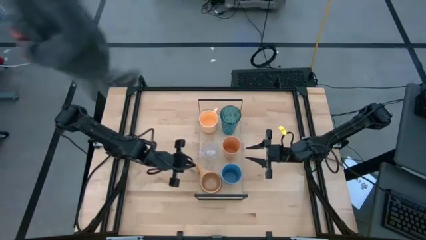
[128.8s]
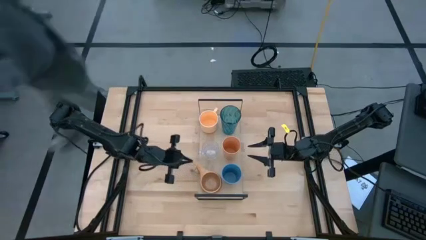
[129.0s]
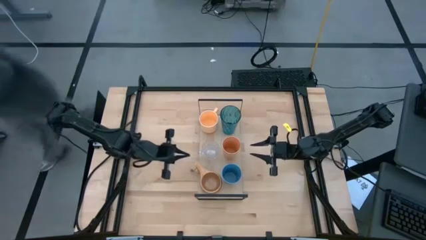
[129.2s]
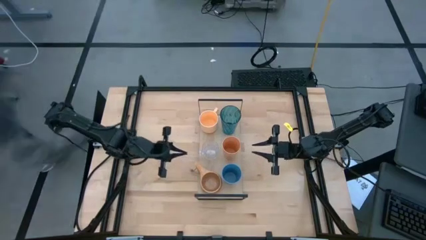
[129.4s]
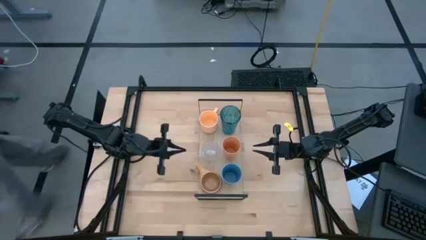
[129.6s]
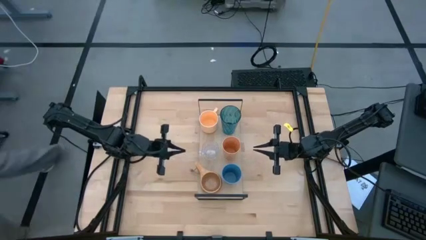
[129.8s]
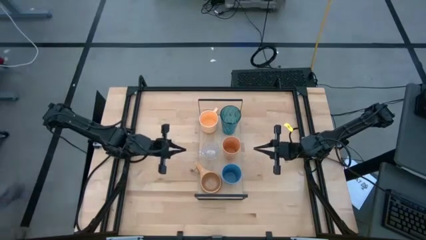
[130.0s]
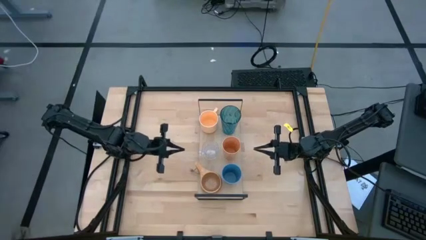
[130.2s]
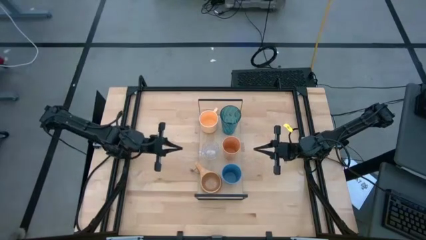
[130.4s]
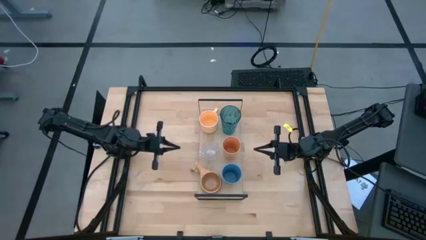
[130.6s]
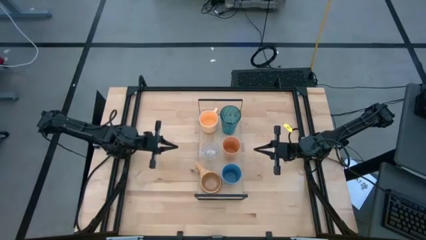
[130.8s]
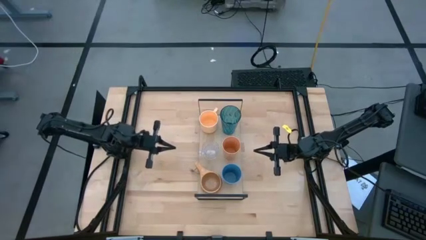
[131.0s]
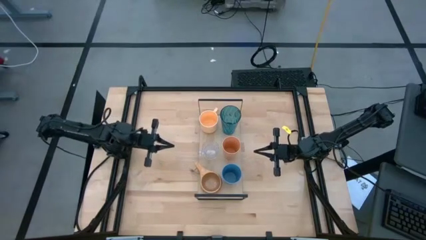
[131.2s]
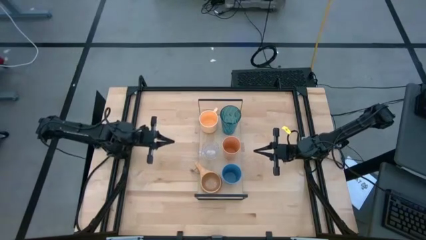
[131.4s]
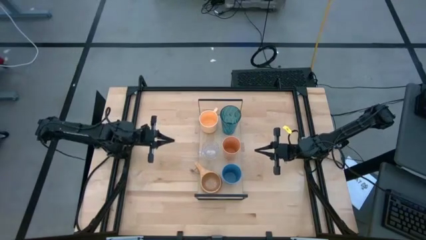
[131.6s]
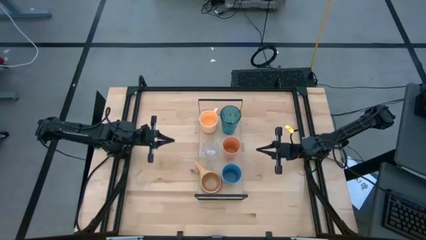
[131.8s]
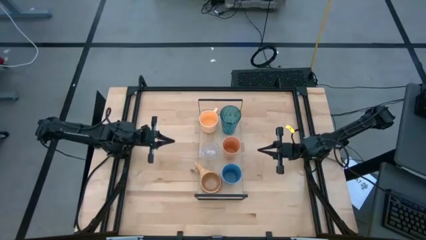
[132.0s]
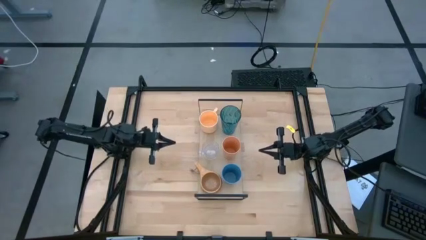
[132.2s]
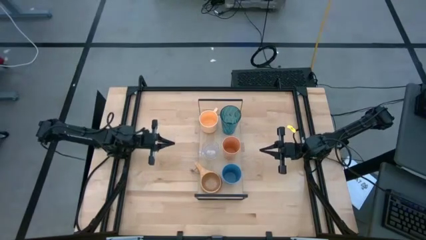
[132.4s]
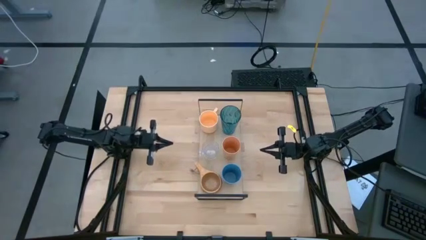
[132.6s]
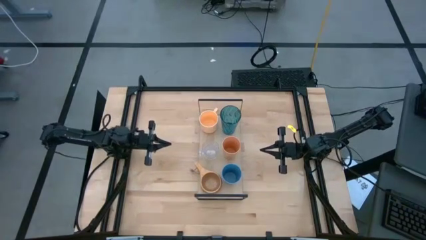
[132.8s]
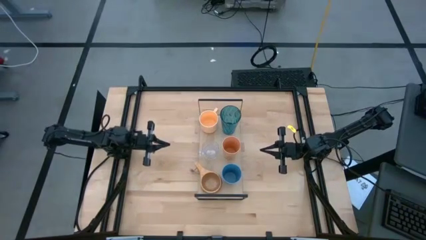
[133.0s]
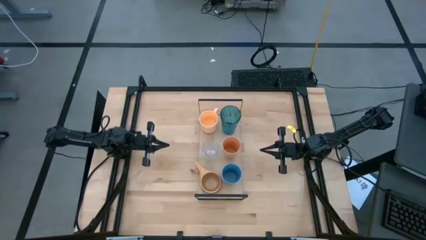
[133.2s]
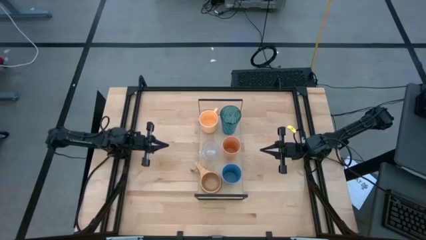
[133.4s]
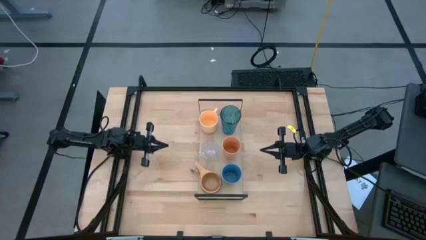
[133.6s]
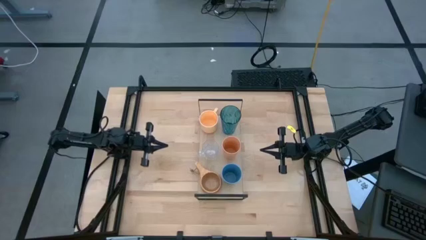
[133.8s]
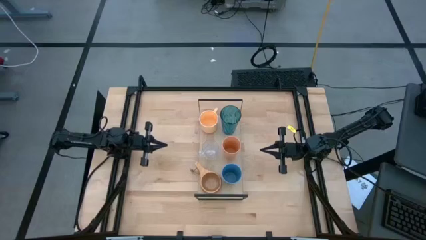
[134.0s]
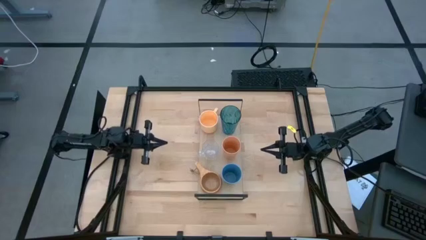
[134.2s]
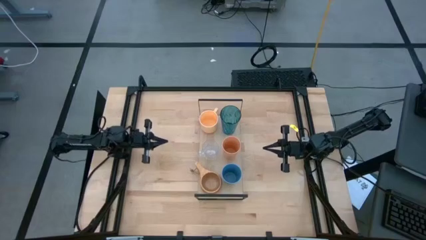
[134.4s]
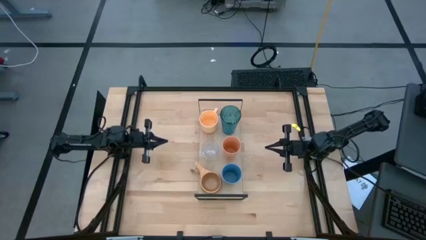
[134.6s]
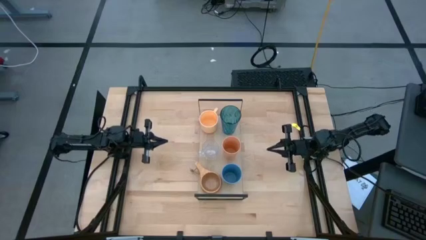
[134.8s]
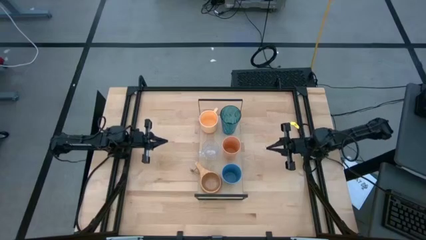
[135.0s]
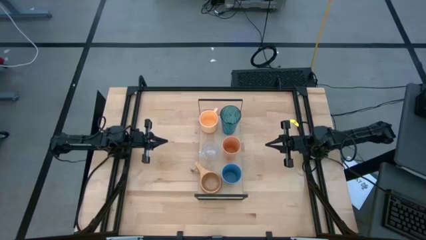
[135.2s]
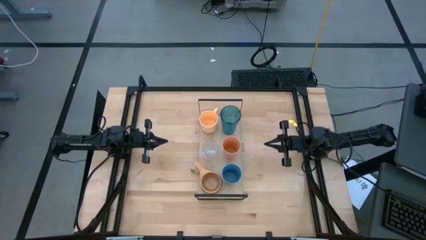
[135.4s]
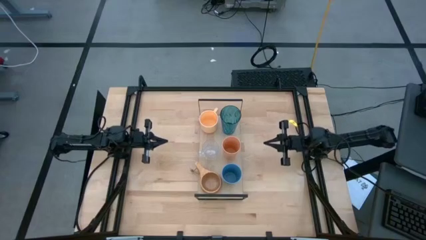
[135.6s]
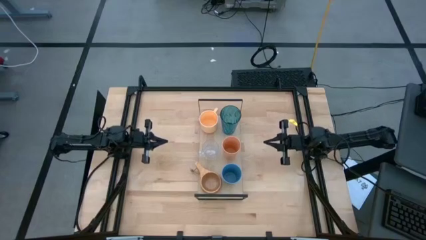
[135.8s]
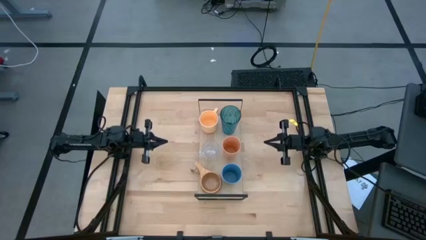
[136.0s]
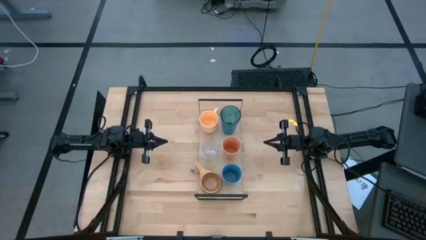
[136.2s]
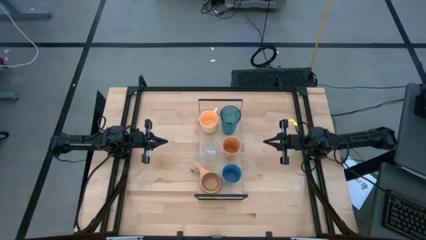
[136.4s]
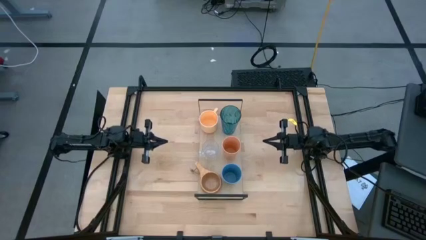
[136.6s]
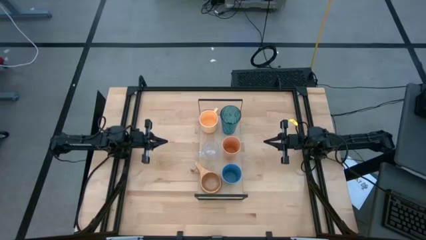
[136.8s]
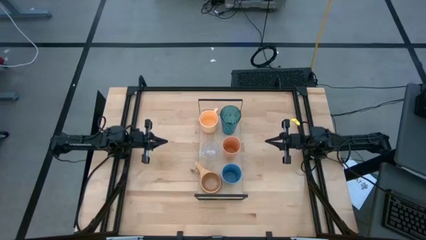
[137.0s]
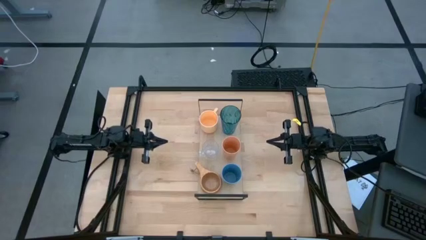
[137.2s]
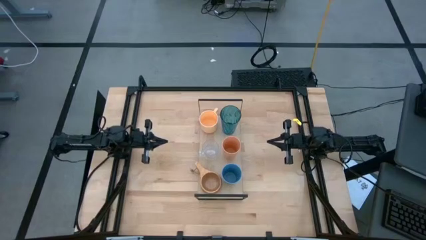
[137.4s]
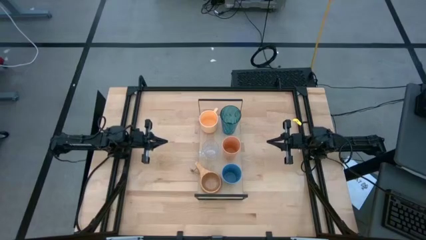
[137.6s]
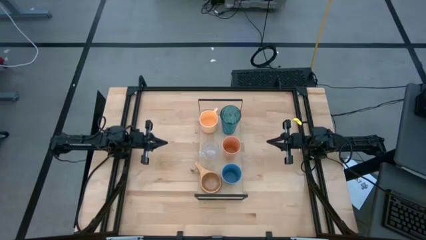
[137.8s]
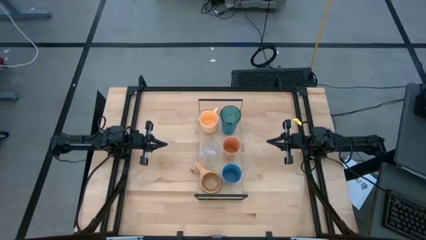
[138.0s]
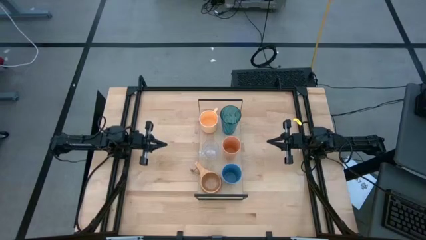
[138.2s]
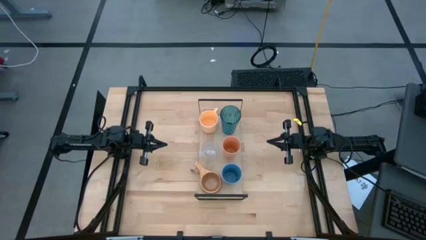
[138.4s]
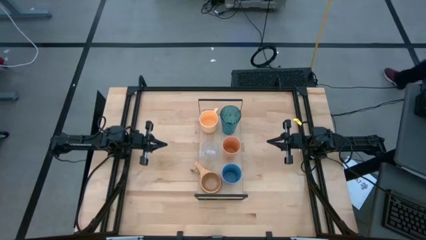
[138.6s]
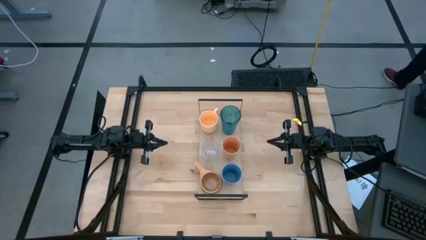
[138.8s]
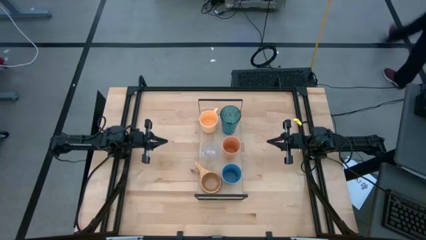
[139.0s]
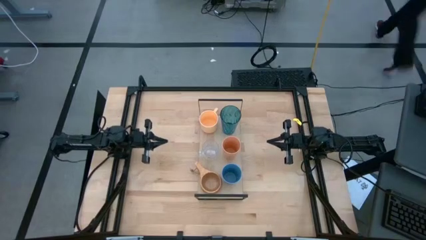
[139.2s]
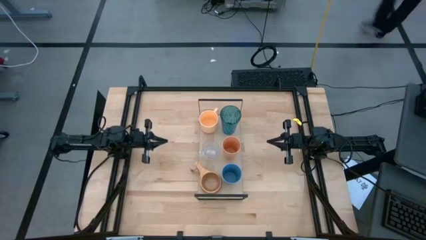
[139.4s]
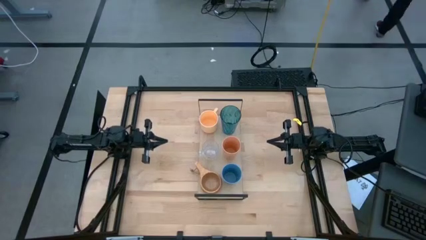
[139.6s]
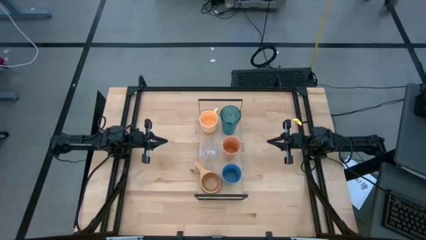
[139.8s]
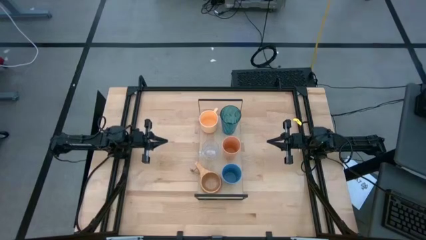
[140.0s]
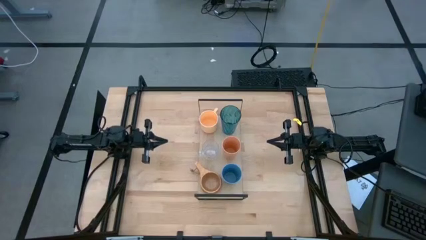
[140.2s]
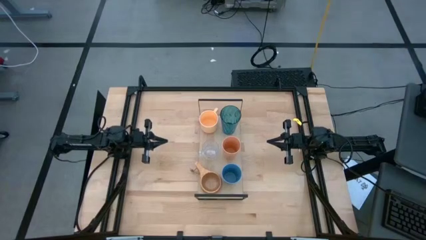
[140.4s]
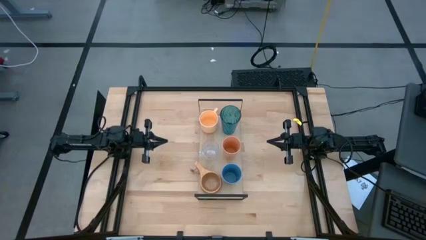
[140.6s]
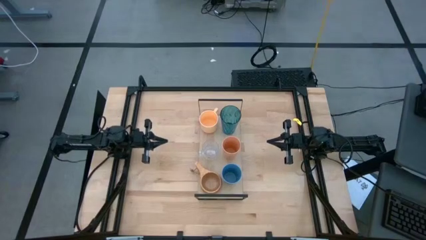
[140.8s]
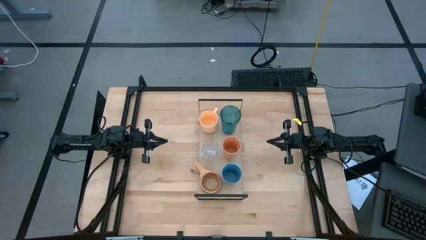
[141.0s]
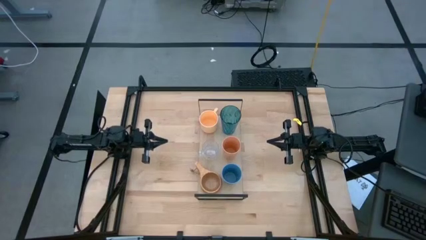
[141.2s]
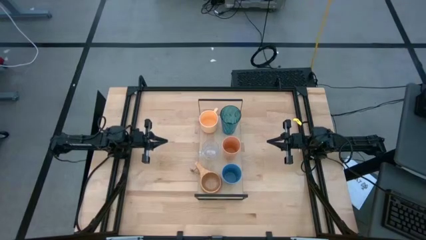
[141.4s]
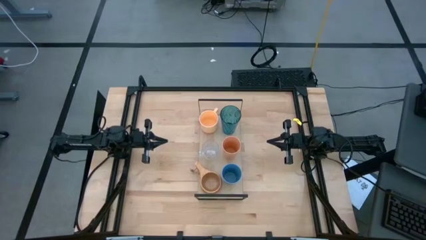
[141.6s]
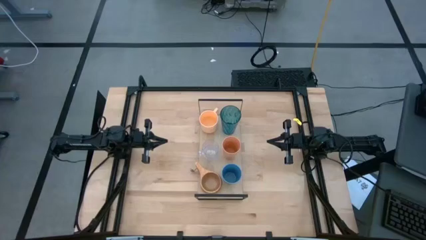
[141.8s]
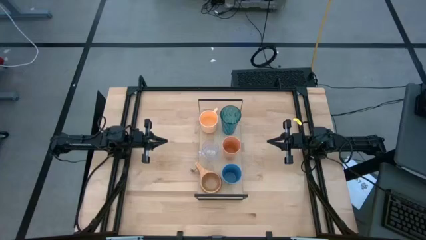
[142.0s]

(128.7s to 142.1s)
Task: Stack small to large cups/mugs on shelf
Return to Home Position
